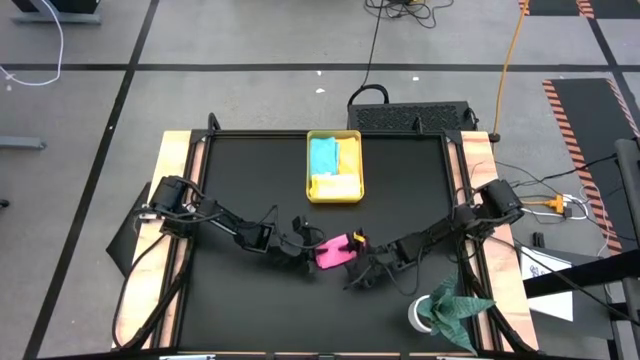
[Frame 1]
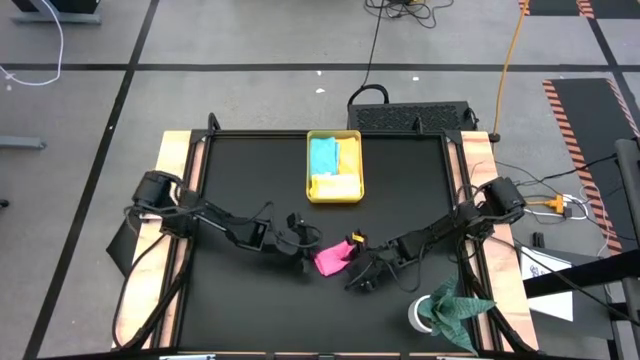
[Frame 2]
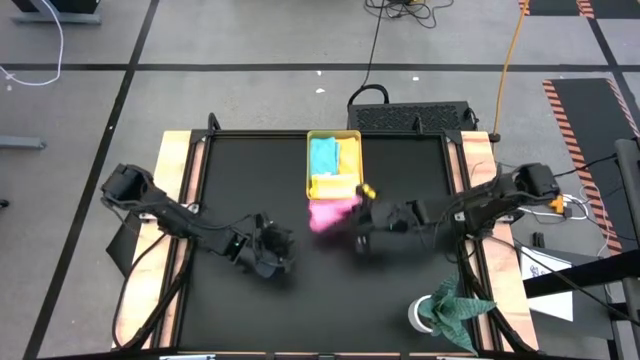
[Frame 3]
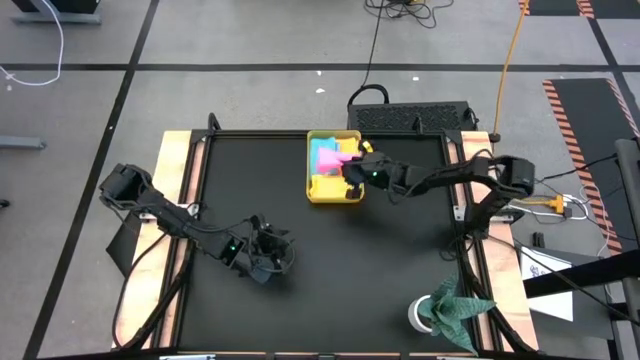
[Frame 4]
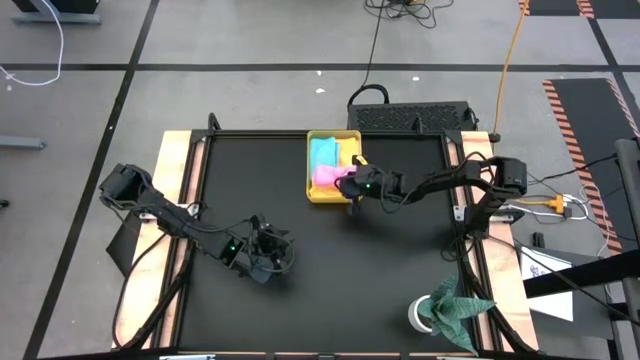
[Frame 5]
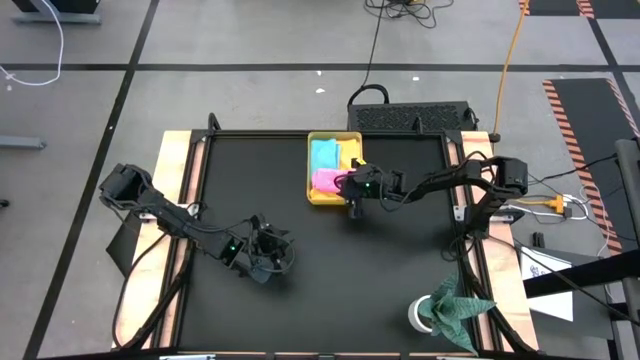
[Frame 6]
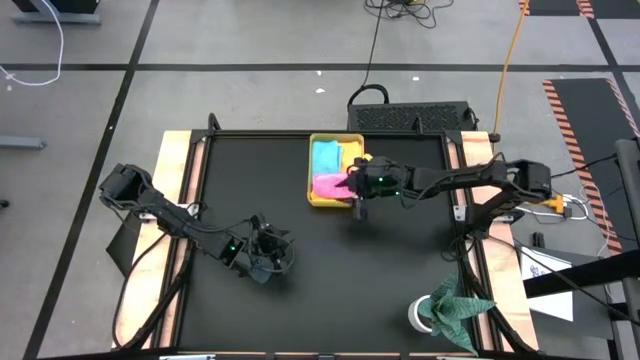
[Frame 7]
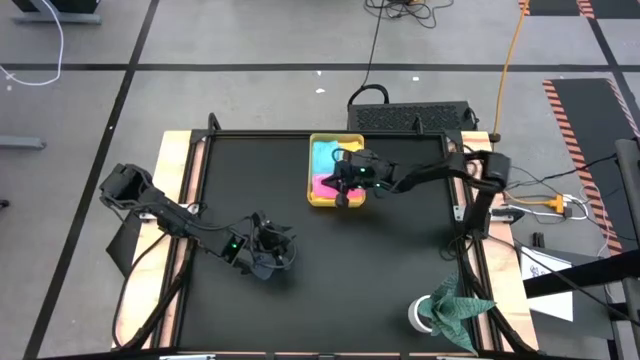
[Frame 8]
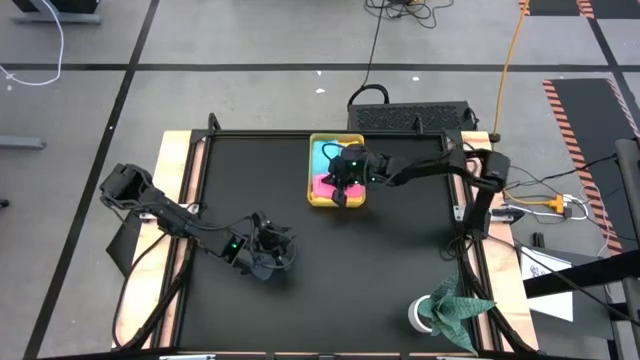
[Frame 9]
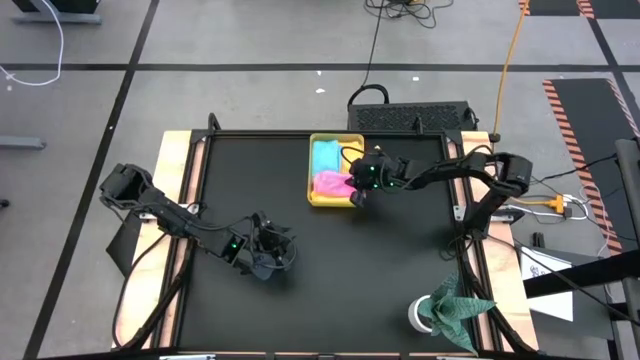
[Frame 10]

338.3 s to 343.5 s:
Task: Fold microfiber towels
Put the pink towel into the yellow bin

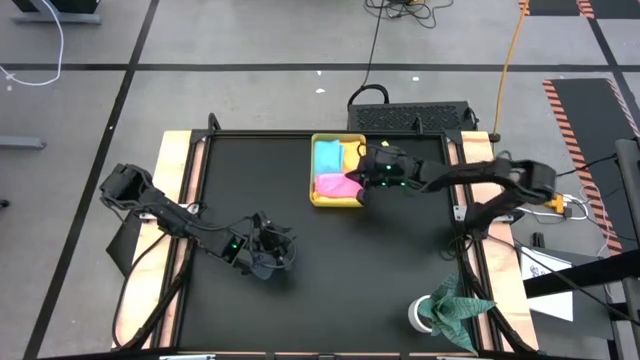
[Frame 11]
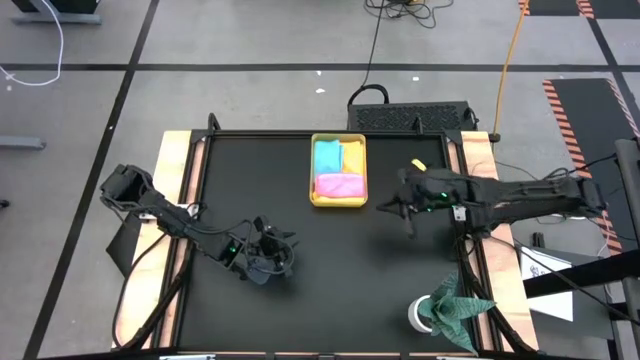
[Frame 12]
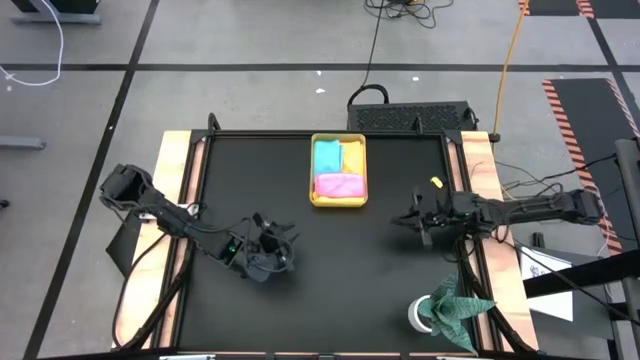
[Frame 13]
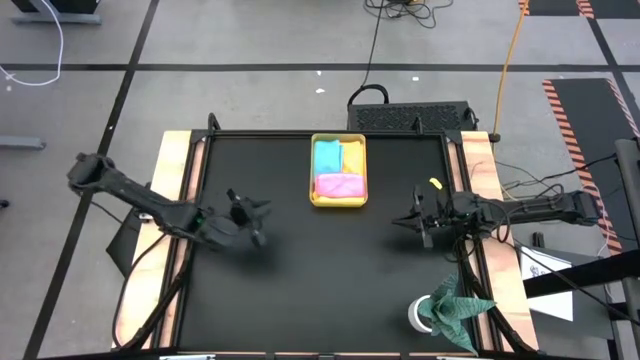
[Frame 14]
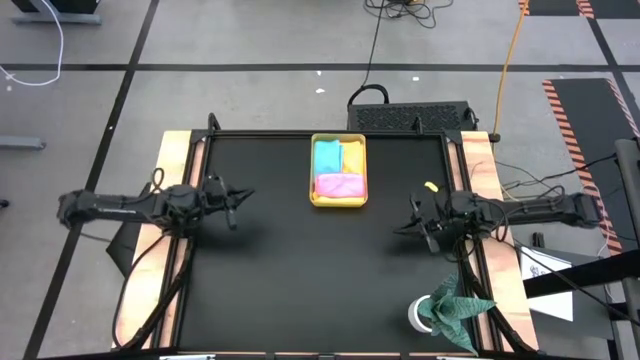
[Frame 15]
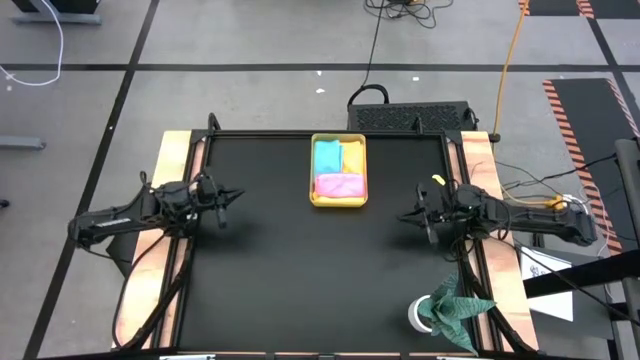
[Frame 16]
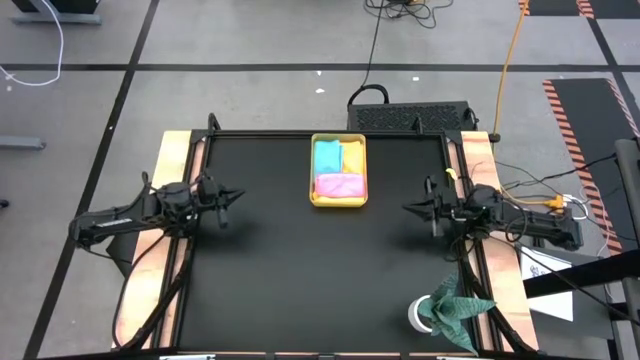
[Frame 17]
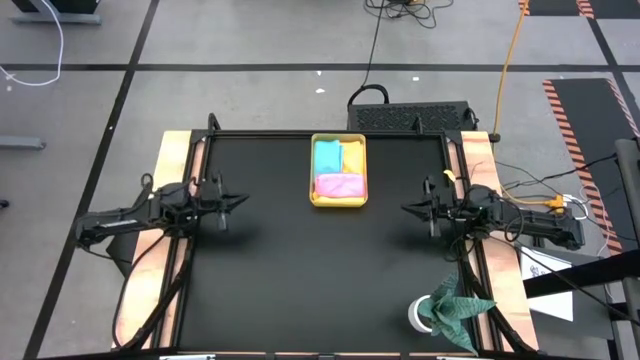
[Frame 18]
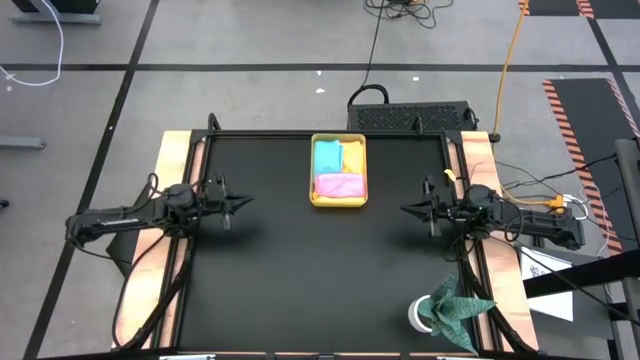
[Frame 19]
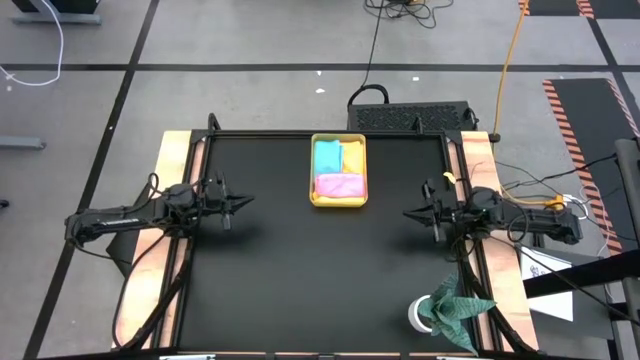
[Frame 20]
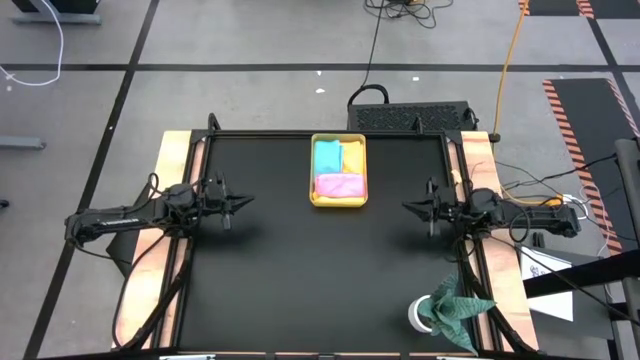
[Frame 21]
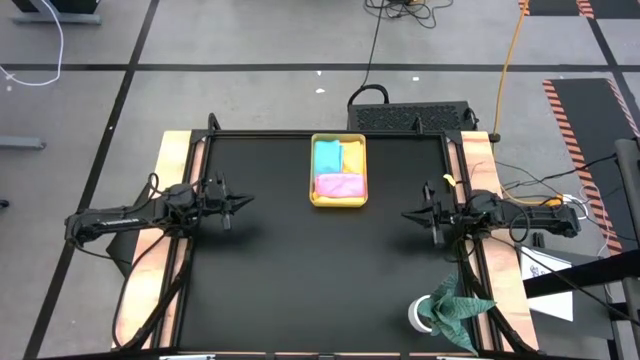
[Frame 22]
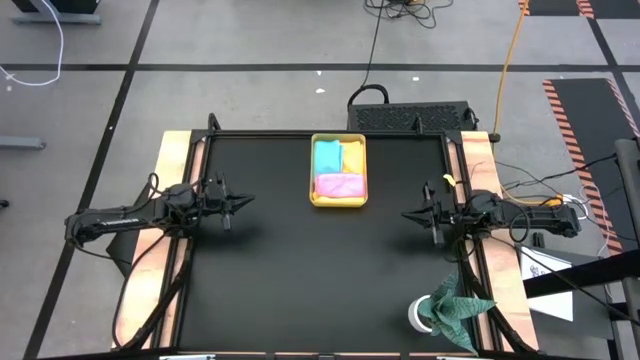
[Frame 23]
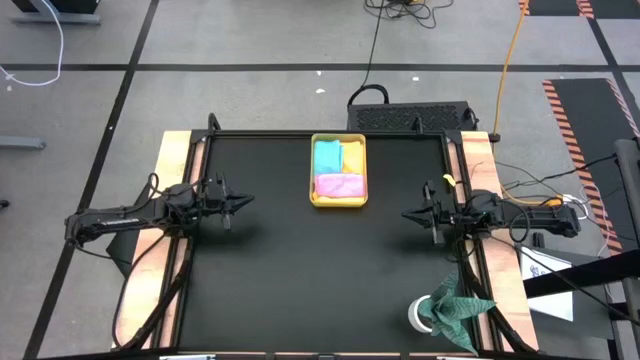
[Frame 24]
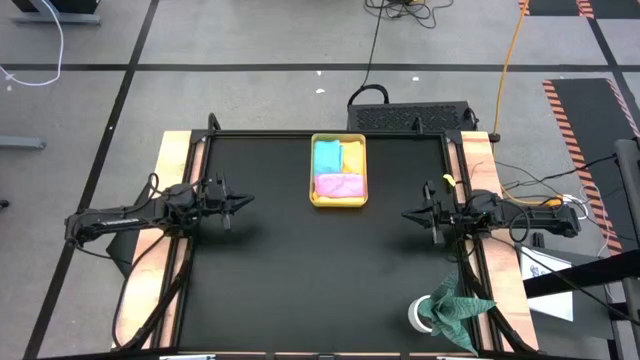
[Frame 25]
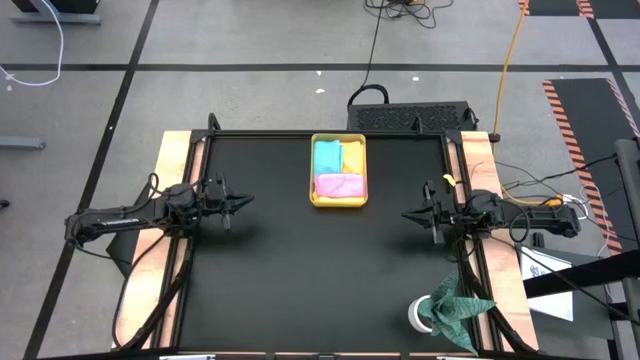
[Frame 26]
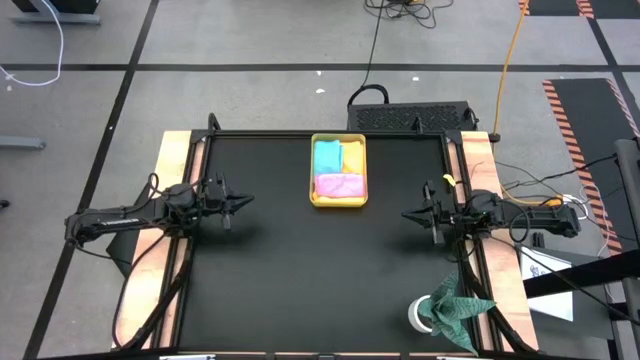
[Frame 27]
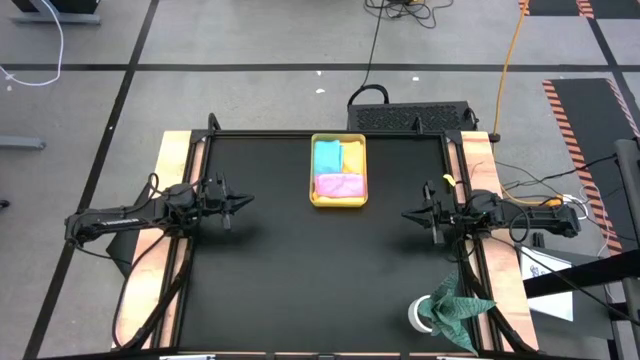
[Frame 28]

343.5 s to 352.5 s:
Return to Home Position

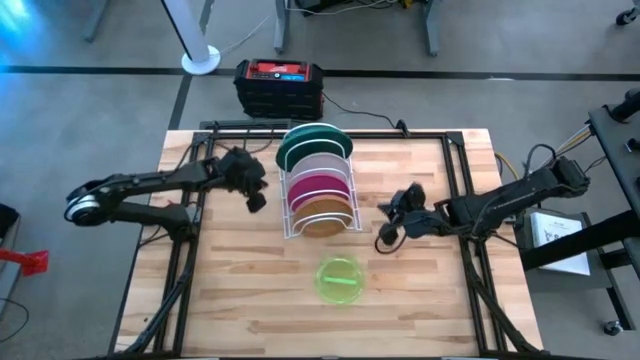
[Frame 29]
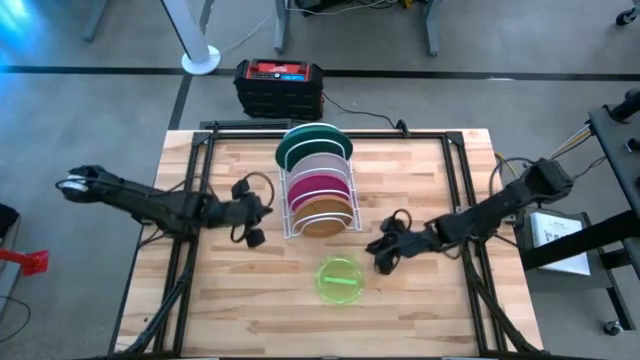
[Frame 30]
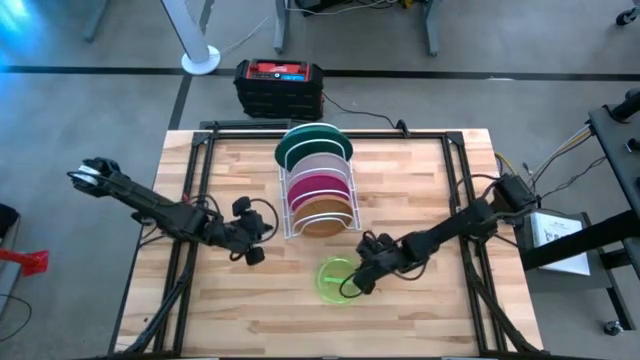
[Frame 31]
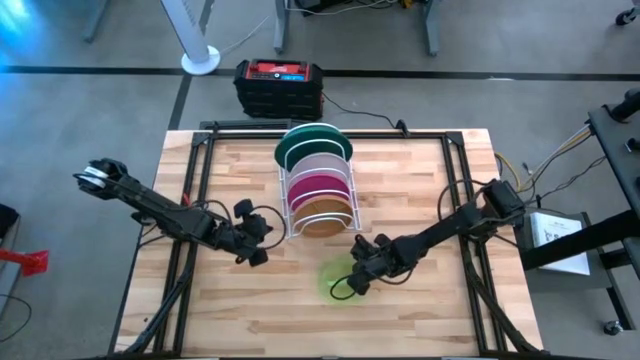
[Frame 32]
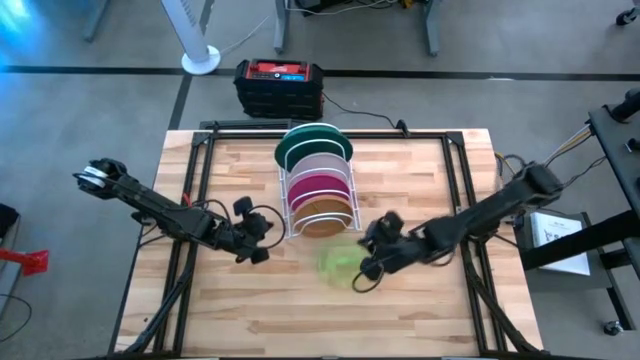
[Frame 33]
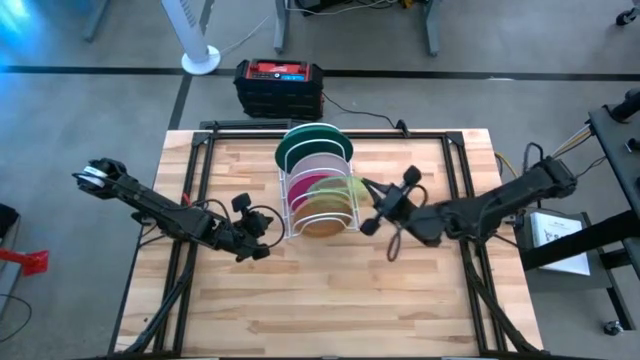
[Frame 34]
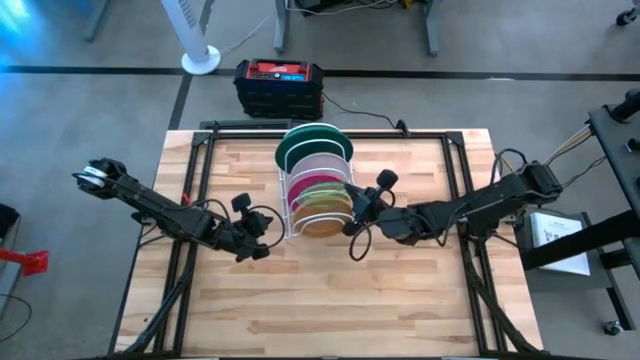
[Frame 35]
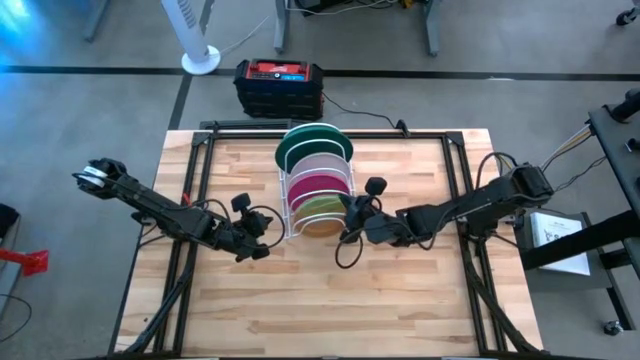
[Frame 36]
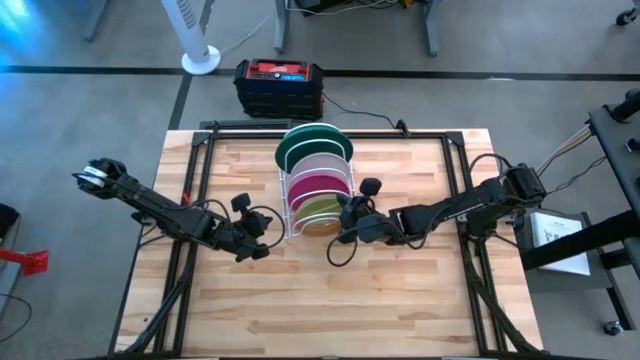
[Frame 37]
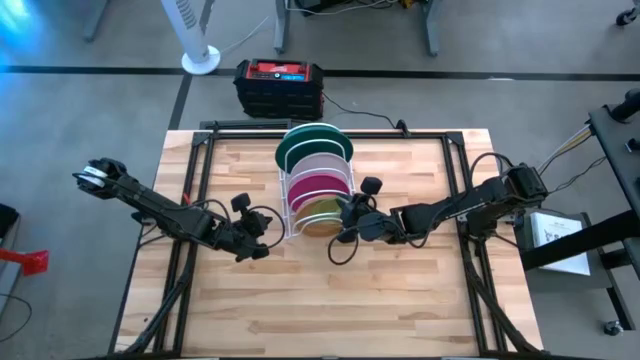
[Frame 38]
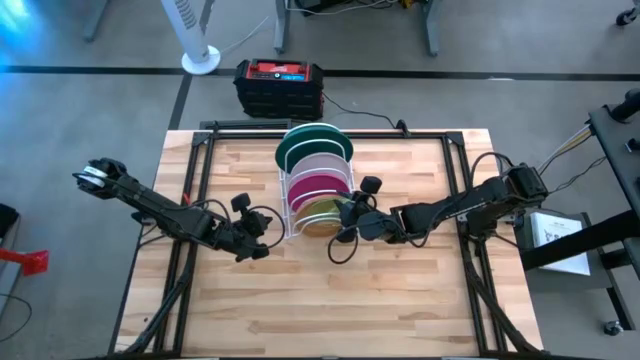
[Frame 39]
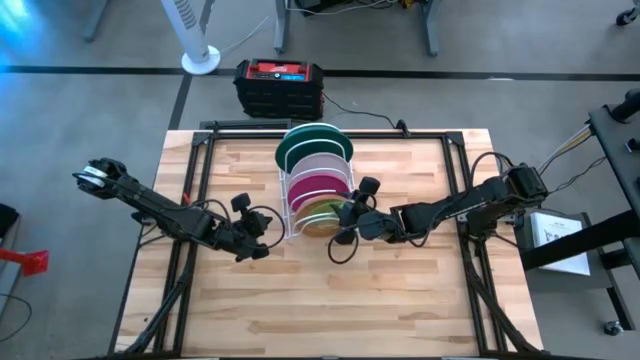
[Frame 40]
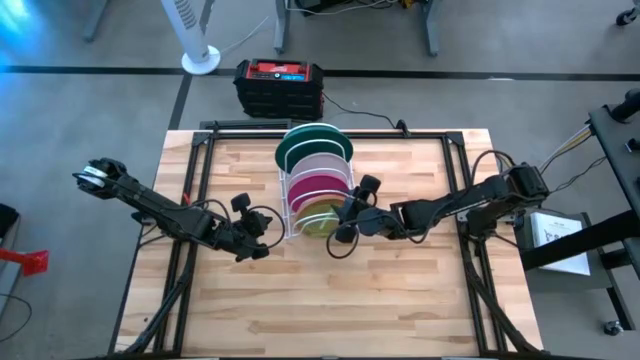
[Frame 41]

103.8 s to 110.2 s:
Task: Sort dishes
Put the light green plate in the dish rack
